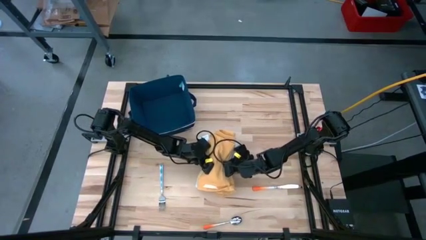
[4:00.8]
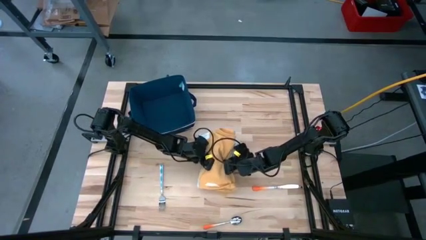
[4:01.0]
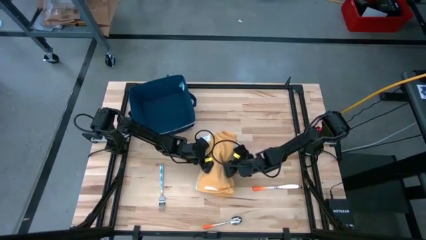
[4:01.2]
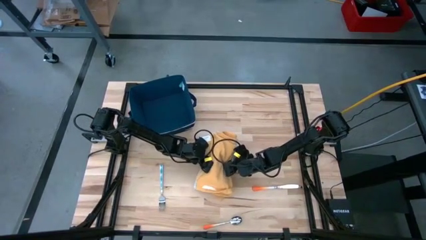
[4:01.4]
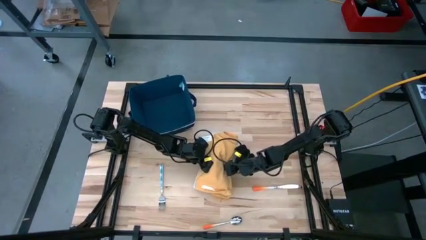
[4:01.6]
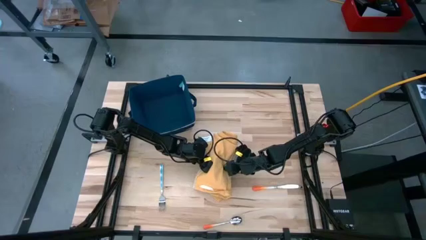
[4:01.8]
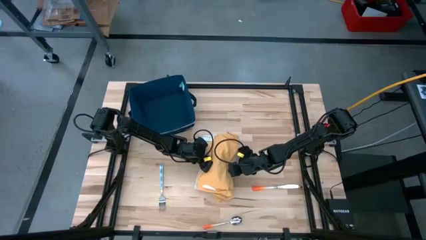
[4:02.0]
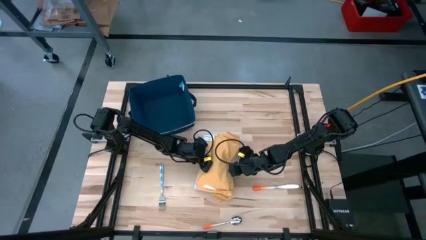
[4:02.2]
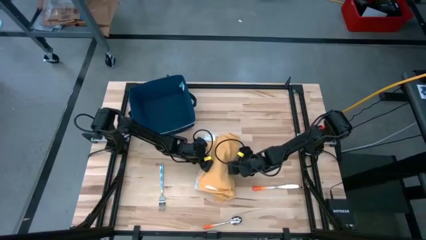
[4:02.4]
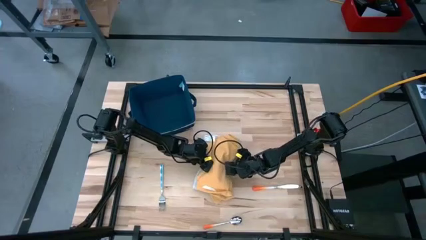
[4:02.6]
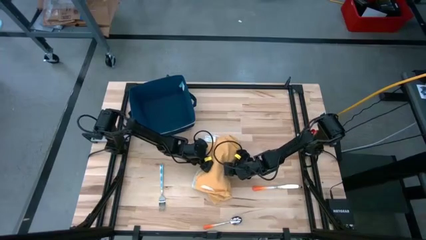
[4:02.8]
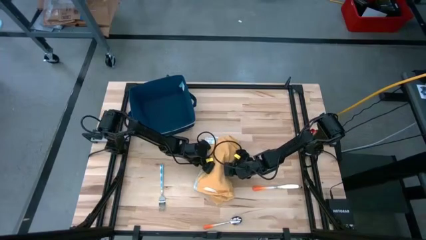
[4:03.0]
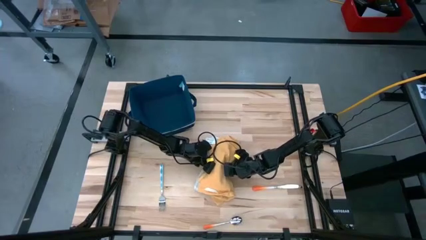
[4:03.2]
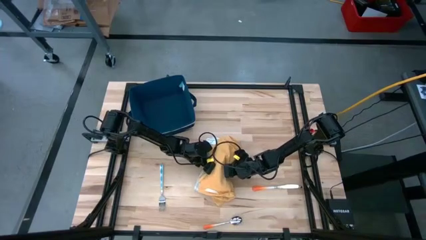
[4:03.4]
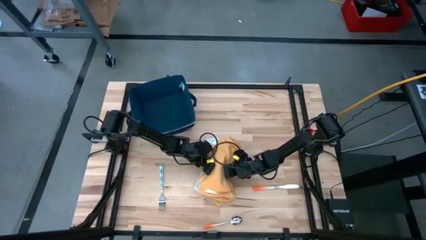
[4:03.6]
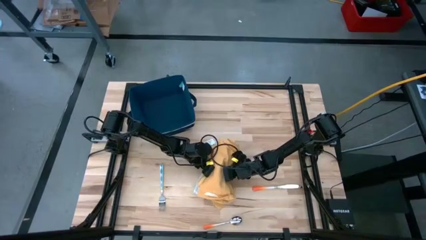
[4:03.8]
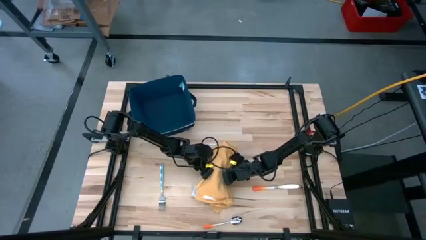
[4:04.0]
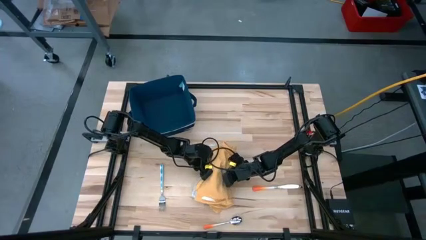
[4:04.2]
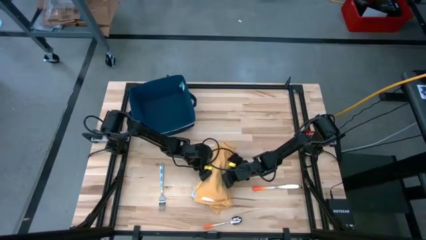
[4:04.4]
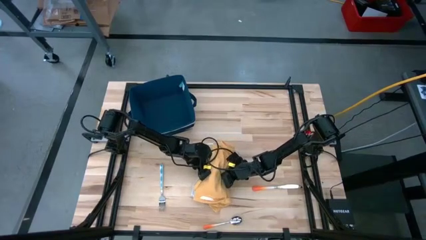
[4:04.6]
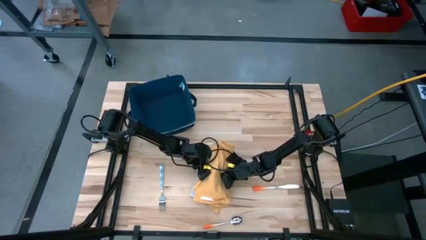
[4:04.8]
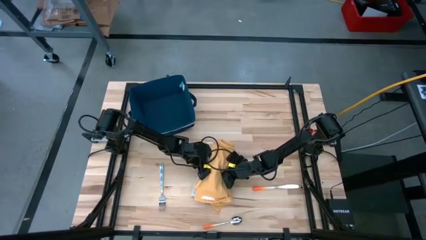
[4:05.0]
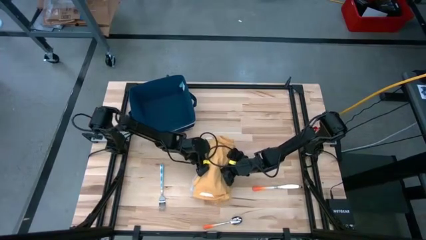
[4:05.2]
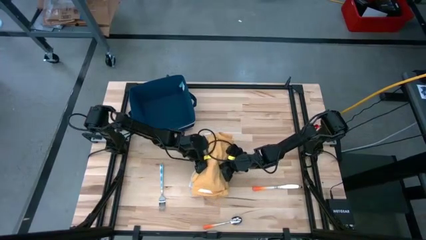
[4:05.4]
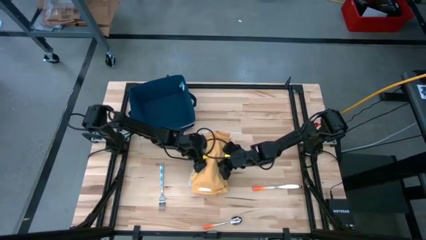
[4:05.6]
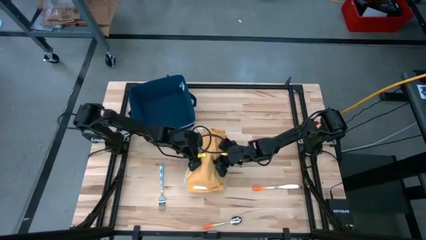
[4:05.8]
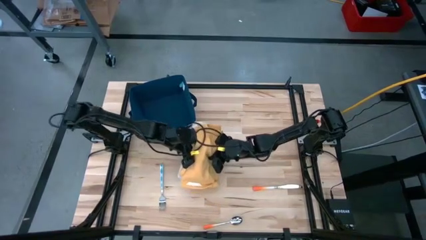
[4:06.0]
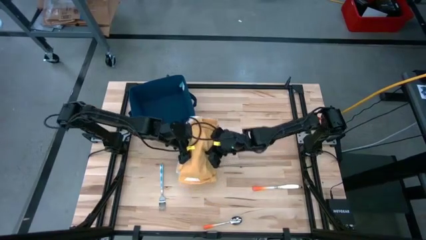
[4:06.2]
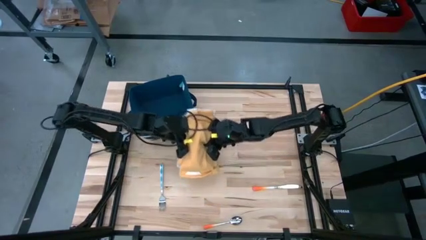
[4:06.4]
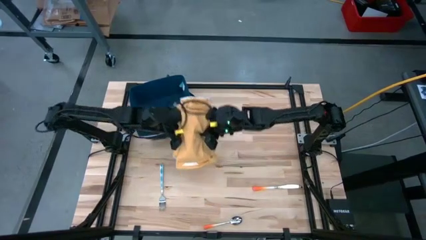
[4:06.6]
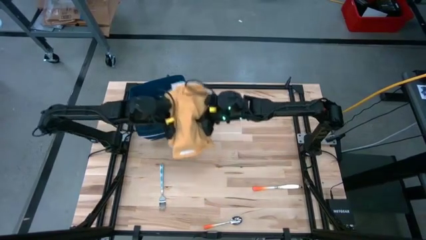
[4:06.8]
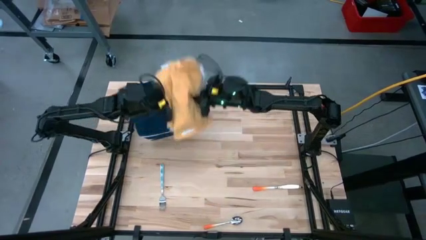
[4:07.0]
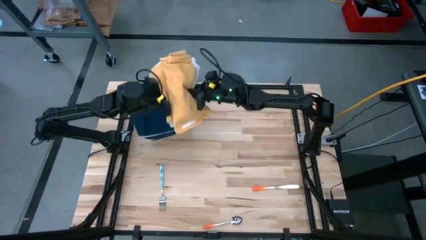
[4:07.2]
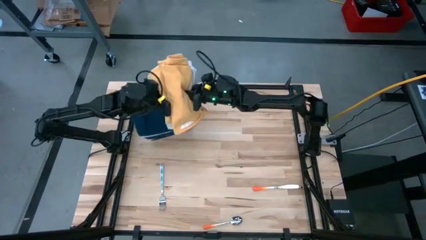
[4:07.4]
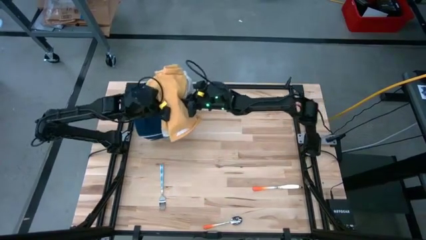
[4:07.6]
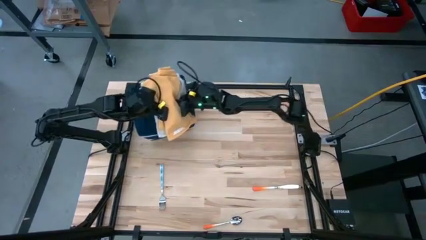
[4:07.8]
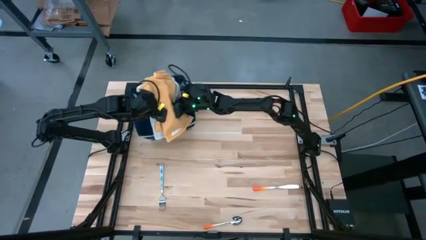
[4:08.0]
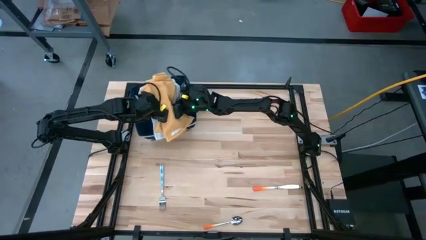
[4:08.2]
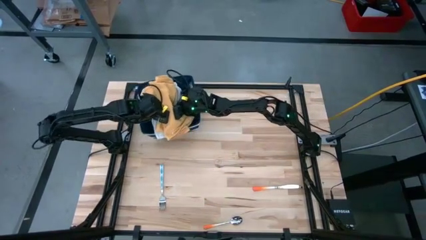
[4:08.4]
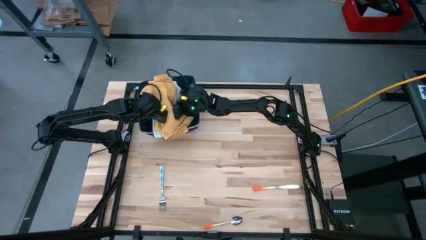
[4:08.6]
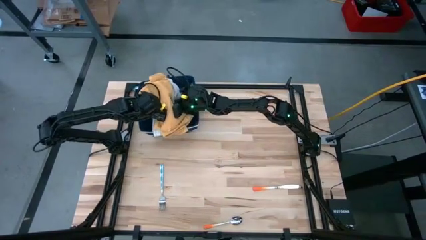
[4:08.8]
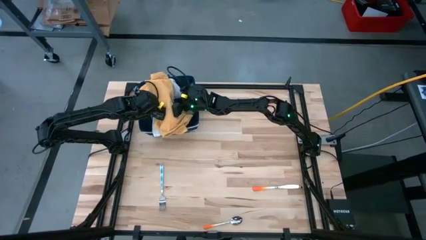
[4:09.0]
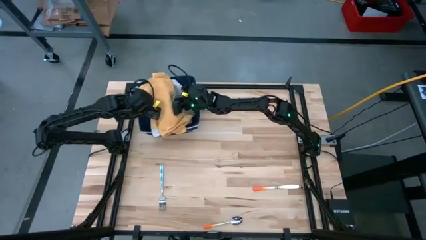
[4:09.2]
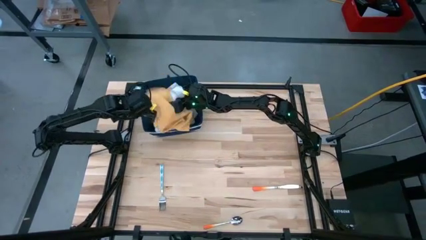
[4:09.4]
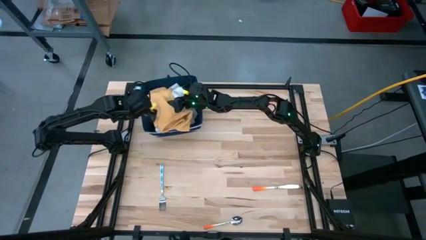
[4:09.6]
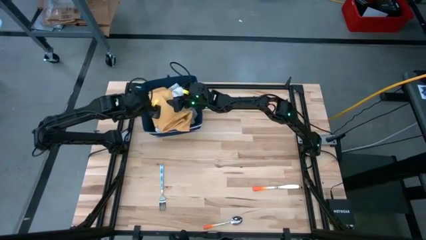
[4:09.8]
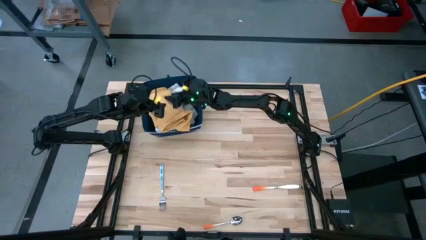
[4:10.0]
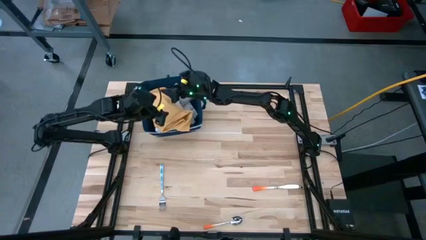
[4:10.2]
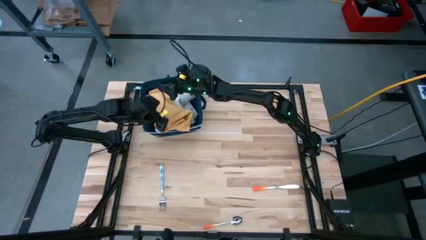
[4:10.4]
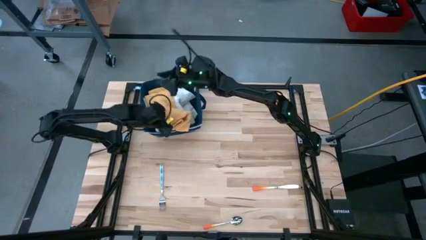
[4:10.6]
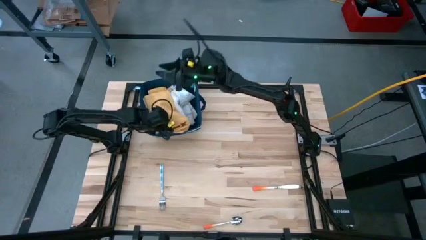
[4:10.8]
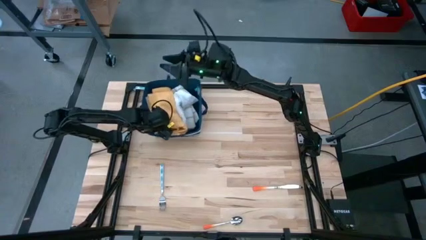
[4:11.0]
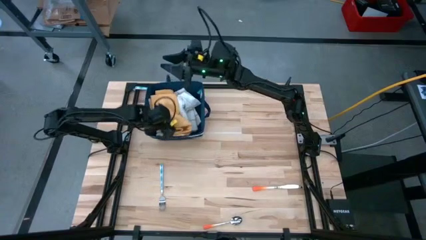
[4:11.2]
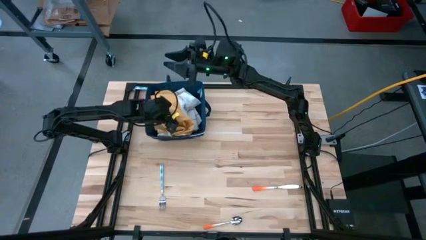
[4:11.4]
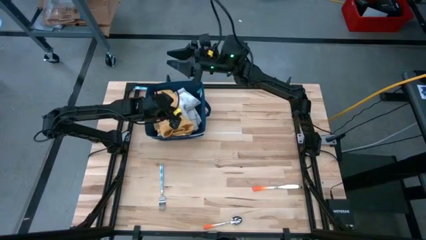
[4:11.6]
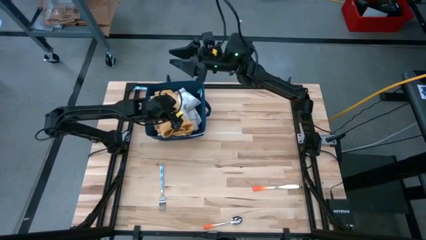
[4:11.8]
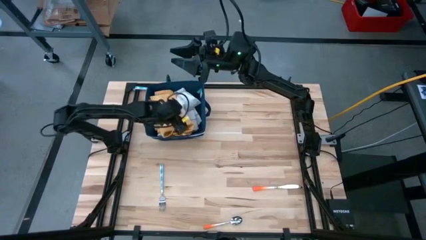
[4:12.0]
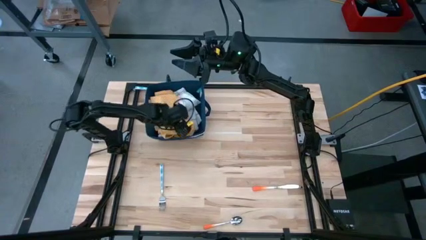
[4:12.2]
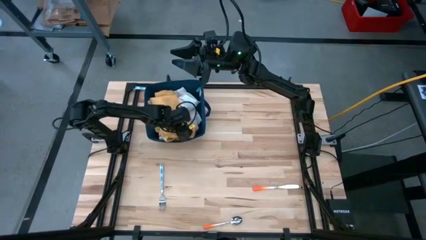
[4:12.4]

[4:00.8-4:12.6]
Task: Fold towel
Put the stacked towels into the blue laundry organizer

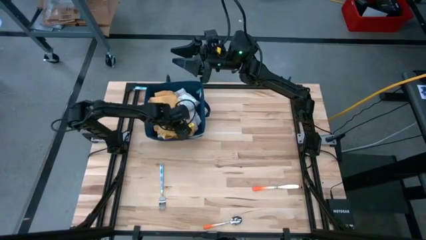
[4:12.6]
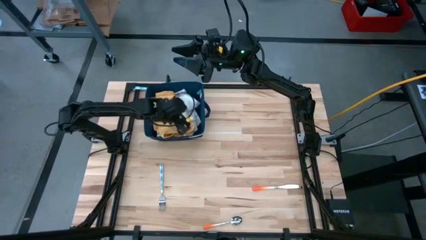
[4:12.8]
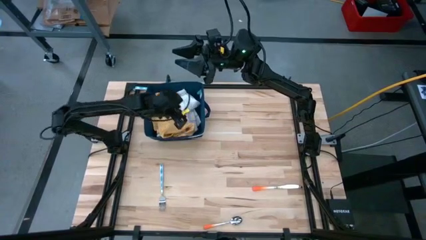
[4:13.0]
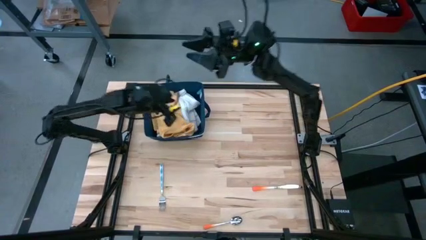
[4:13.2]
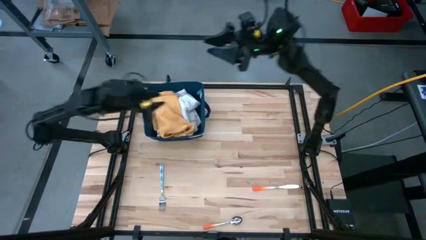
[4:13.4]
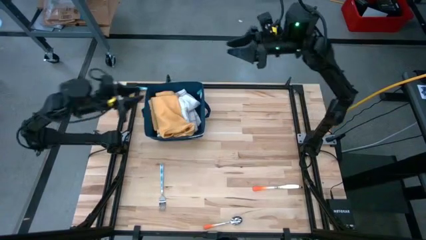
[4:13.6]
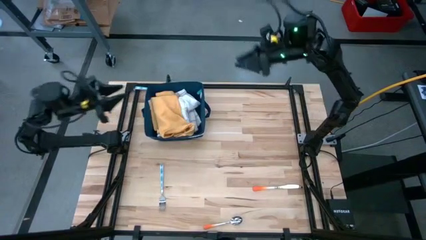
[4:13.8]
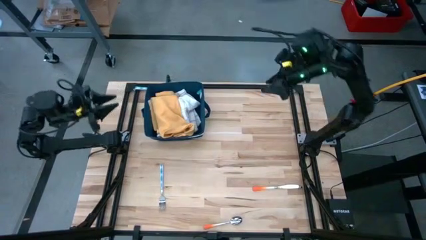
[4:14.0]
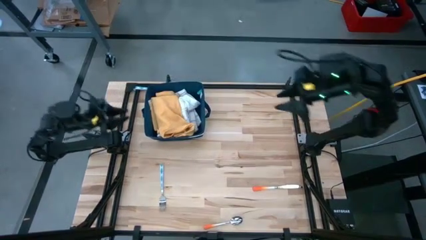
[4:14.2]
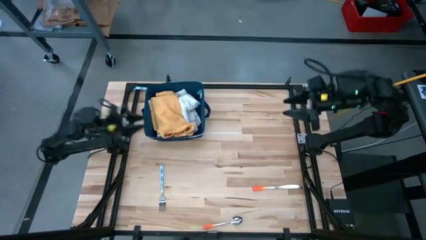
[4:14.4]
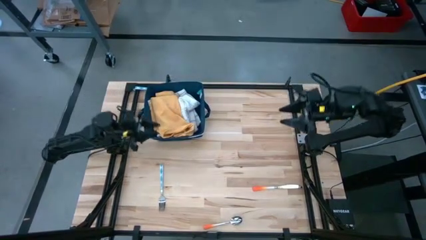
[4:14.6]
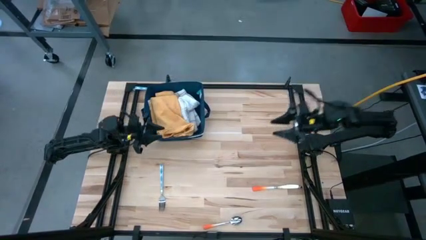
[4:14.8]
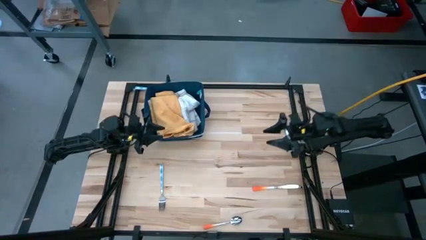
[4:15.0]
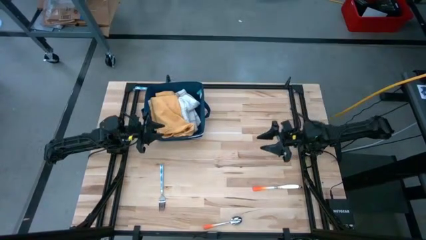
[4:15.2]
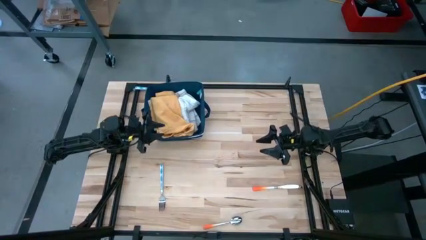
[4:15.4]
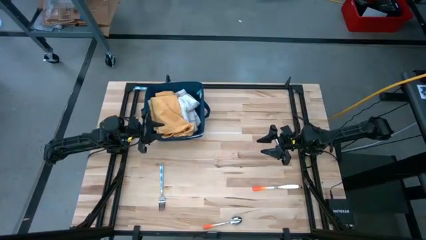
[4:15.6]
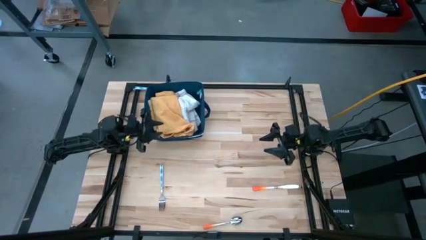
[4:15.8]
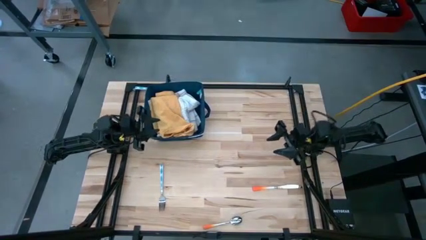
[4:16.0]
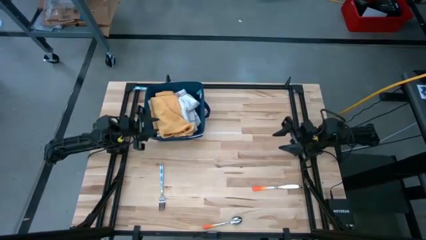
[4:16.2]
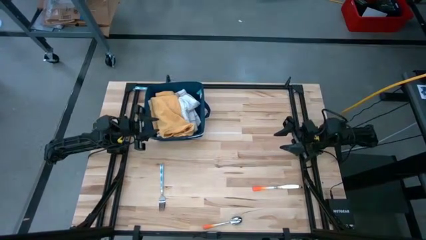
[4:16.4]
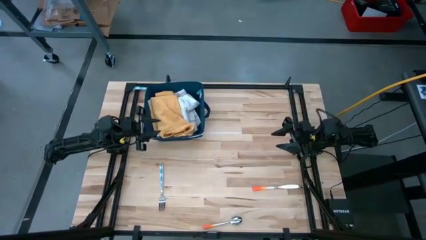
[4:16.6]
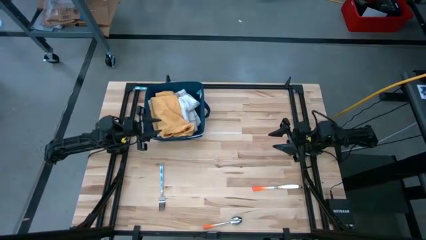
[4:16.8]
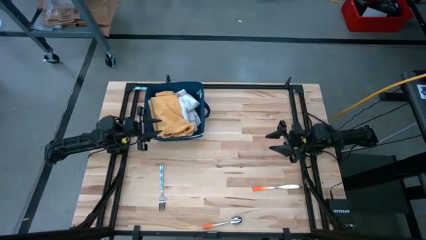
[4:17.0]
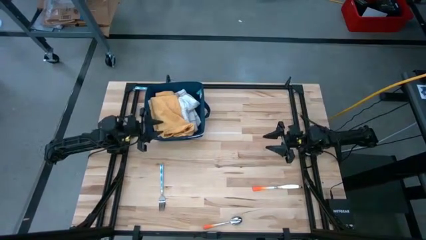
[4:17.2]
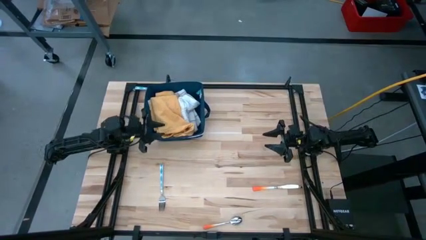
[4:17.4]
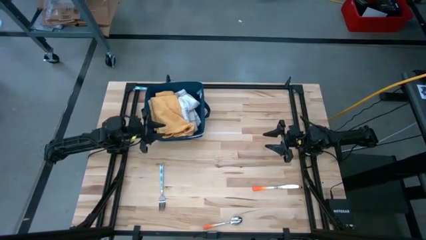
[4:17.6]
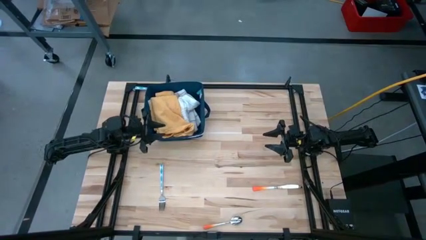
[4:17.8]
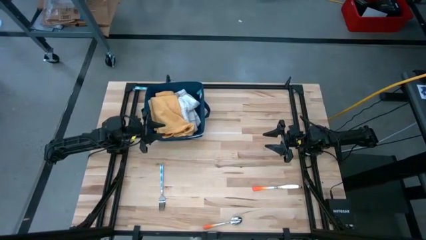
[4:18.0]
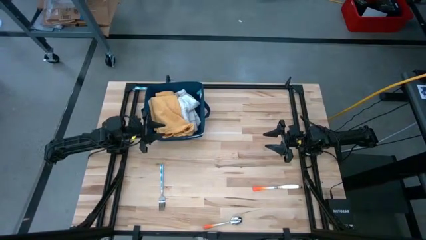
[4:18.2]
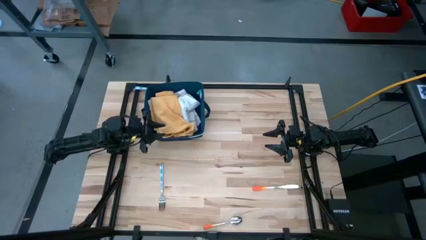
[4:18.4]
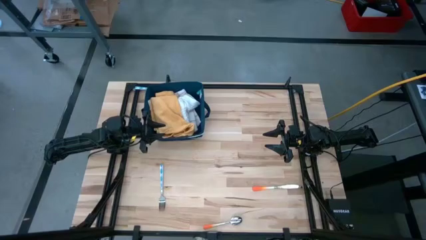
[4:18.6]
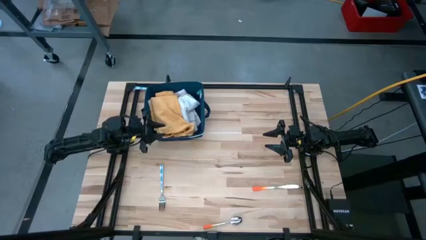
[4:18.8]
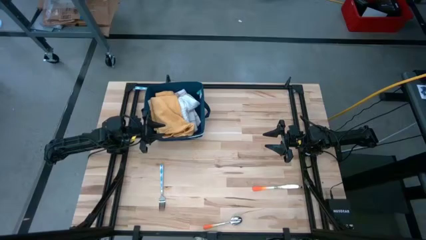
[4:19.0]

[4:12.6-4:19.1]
Return to Home Position
